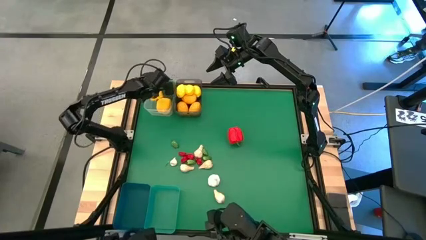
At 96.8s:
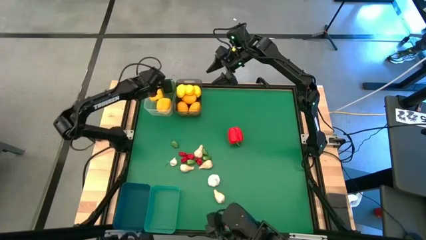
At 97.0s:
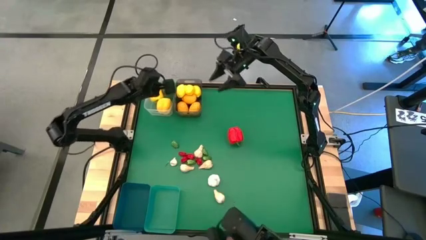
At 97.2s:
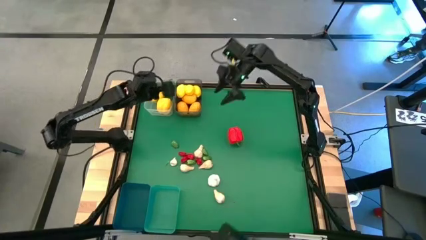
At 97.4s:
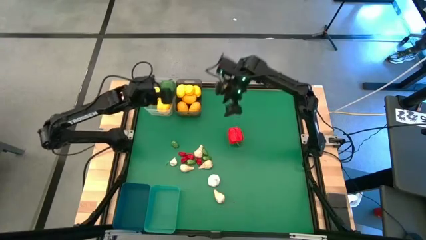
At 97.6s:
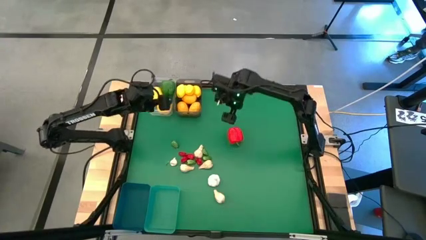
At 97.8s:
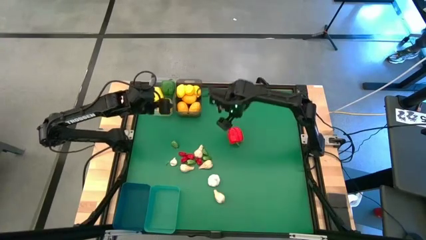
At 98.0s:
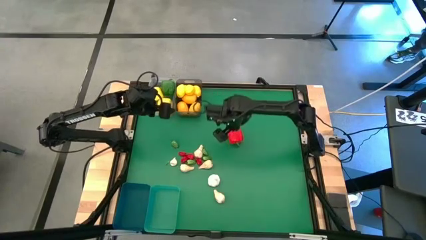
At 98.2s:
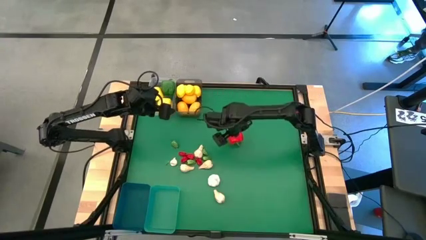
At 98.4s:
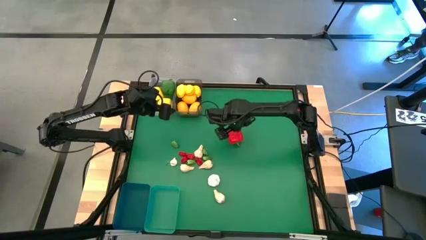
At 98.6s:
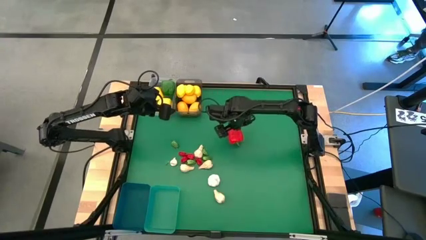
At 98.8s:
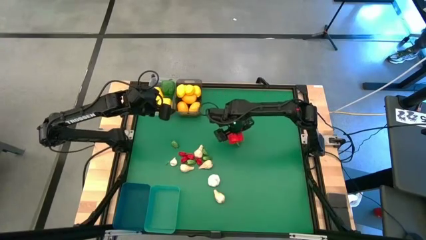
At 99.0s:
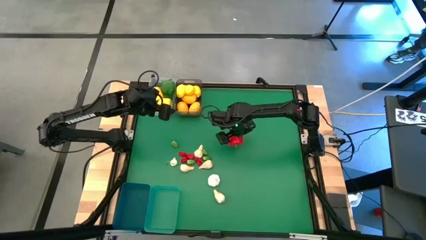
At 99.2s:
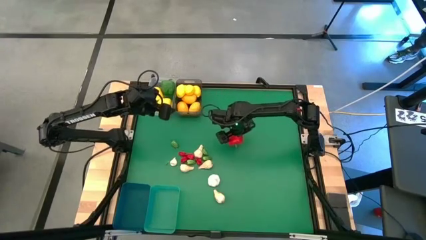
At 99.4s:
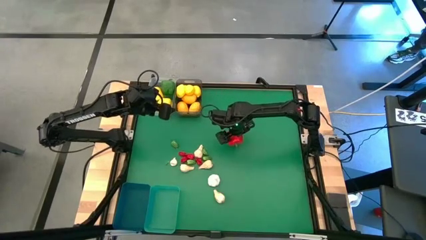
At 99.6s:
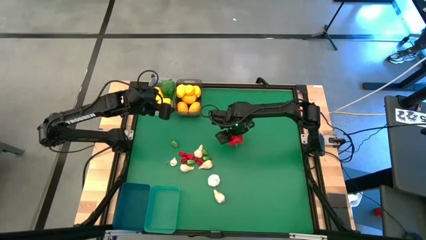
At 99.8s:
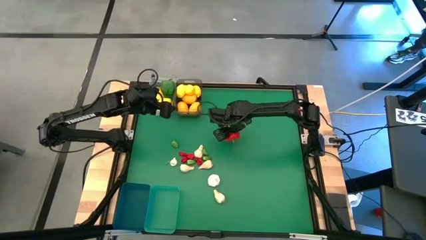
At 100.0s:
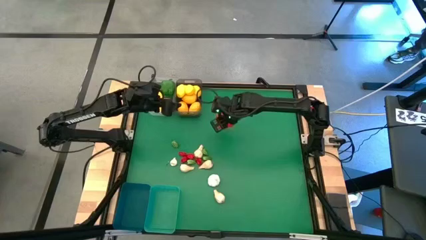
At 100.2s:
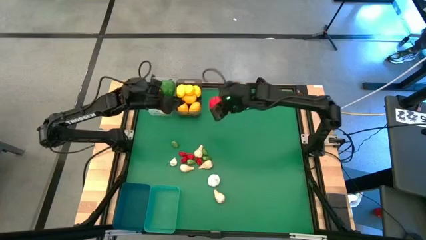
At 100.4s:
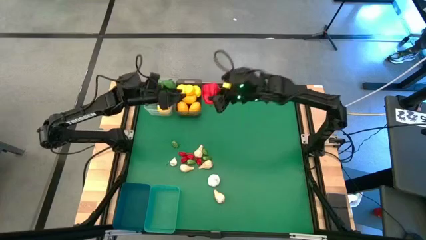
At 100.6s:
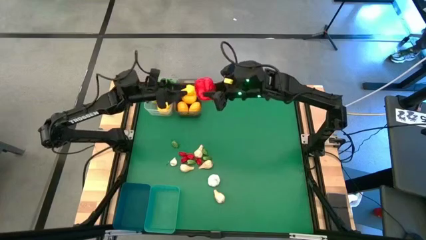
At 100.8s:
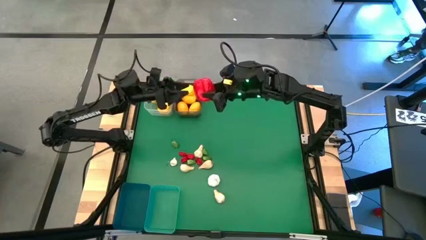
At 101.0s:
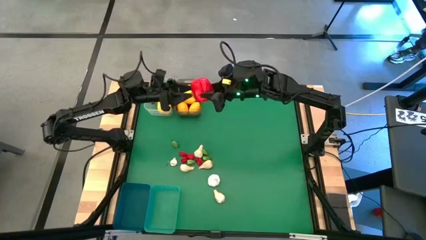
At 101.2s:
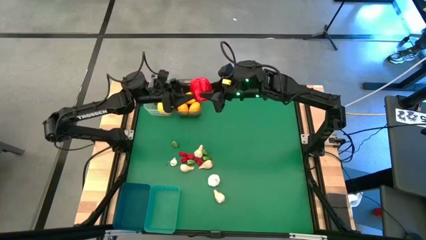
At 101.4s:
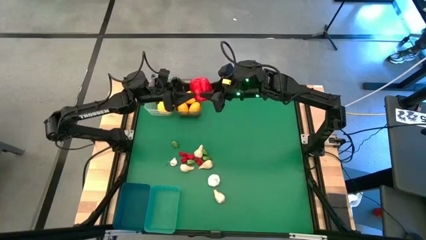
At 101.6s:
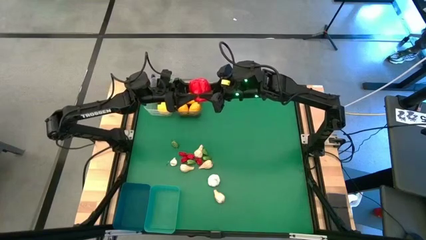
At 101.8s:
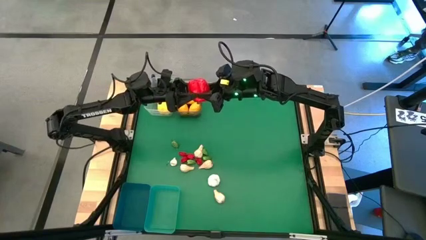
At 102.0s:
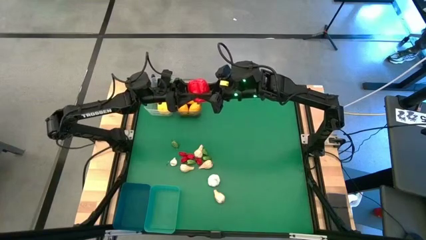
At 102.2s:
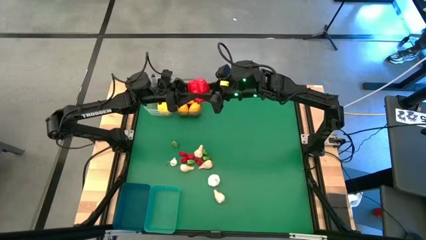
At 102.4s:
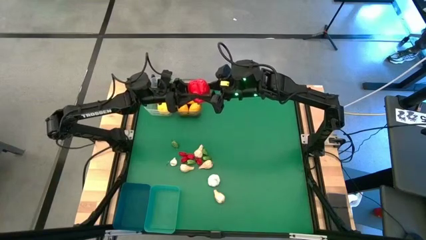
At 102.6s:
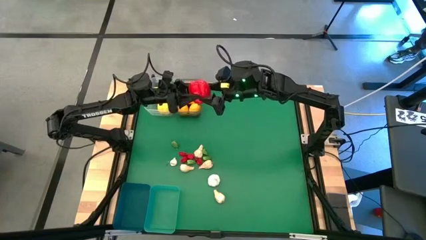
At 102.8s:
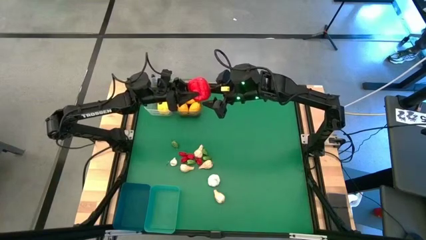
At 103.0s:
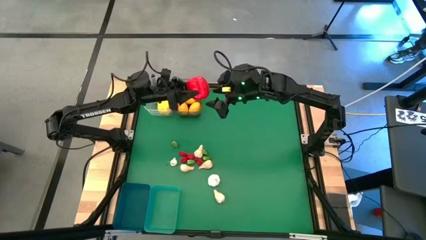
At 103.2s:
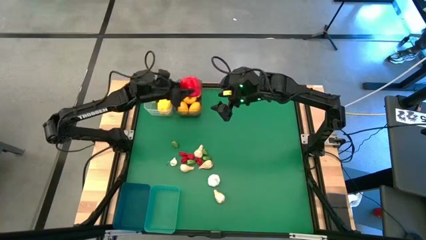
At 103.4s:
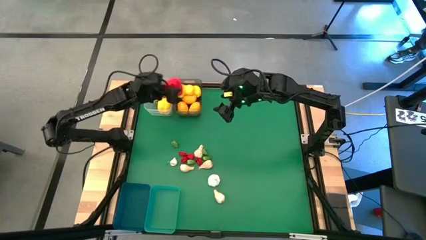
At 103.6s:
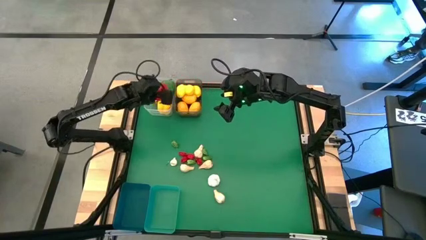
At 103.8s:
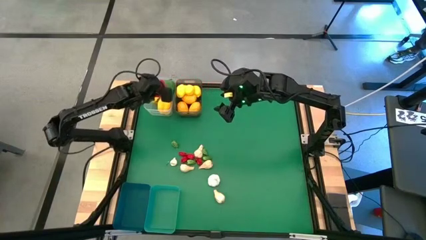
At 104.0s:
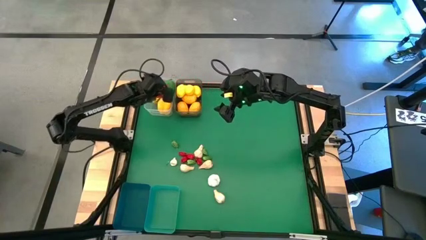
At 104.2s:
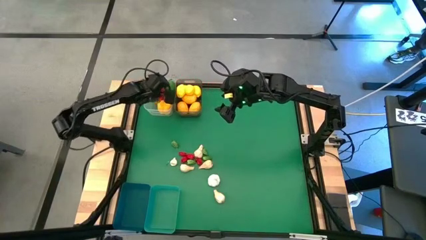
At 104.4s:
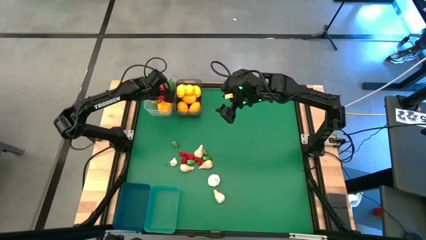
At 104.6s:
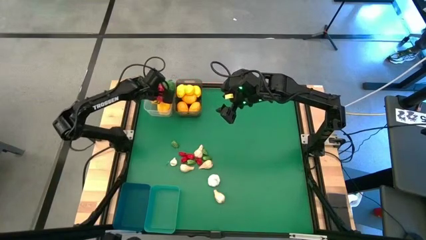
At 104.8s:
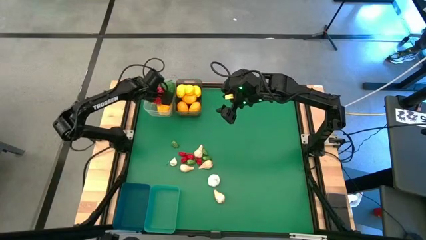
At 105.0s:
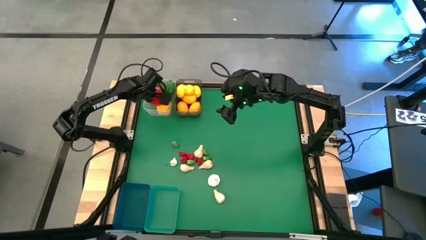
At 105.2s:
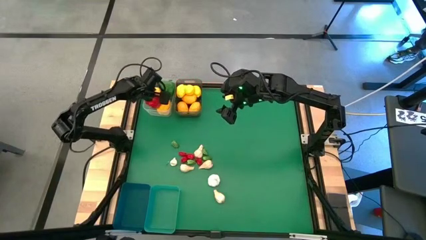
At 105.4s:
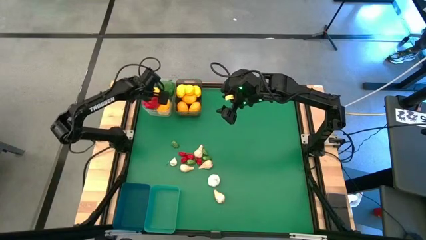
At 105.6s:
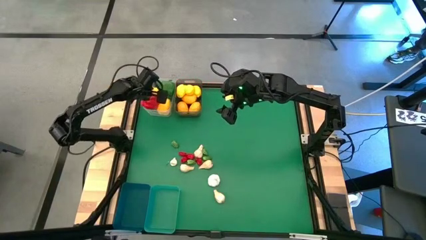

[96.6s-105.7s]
Task: Sort produce into baskets
Put the red bell pepper into the transparent bin

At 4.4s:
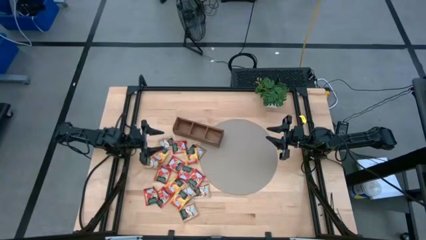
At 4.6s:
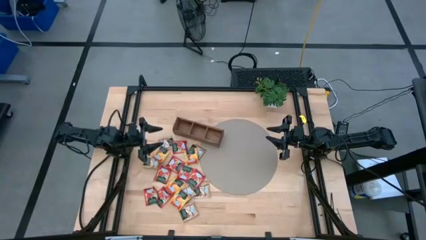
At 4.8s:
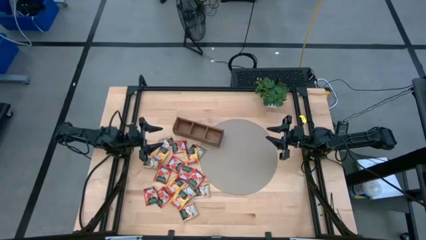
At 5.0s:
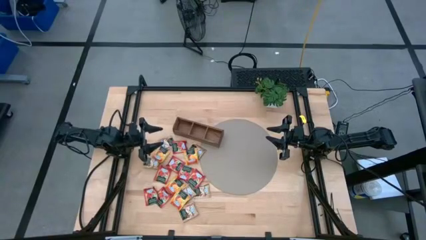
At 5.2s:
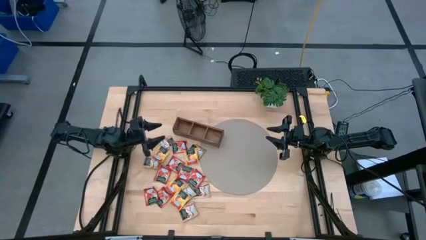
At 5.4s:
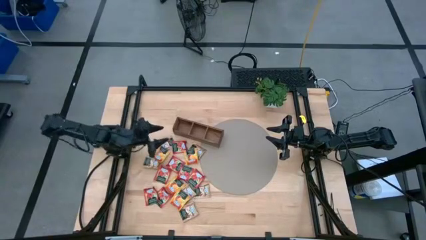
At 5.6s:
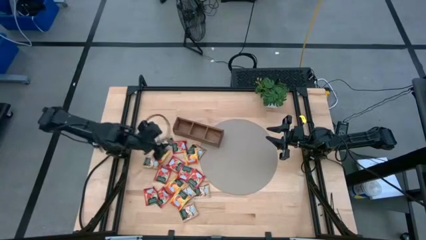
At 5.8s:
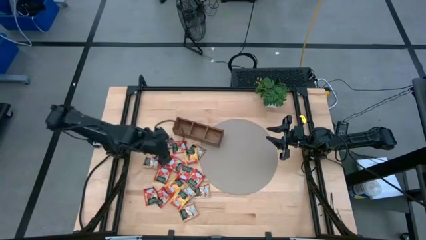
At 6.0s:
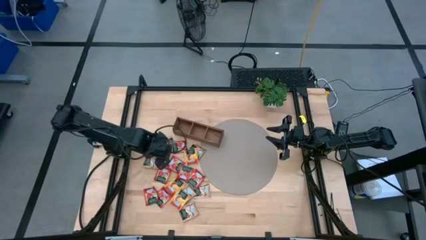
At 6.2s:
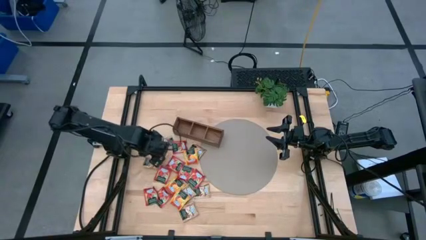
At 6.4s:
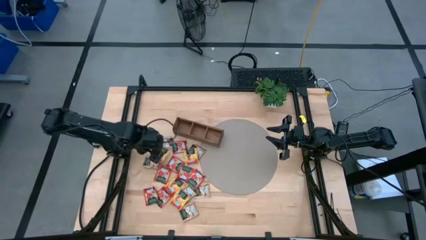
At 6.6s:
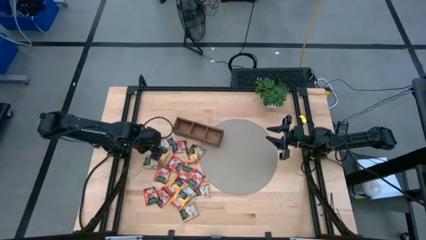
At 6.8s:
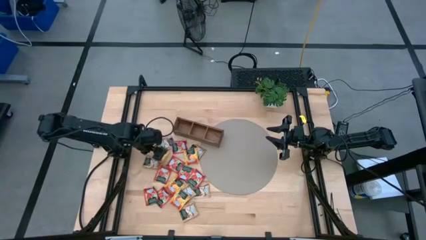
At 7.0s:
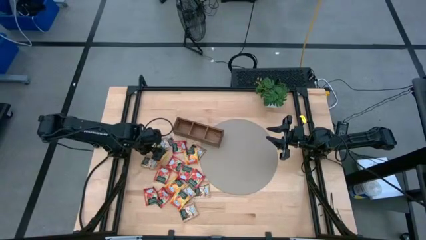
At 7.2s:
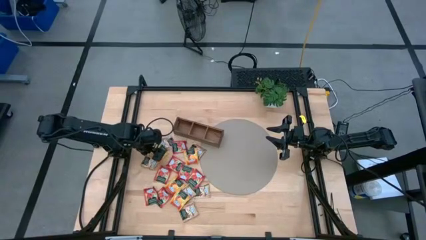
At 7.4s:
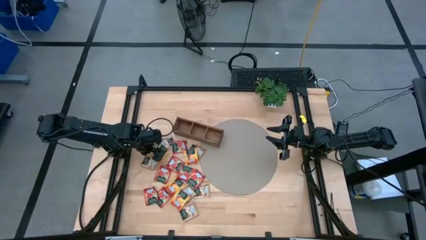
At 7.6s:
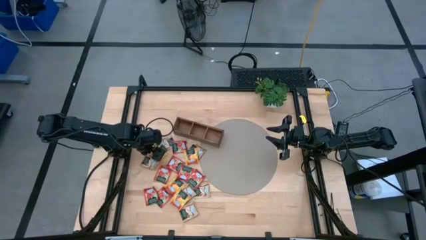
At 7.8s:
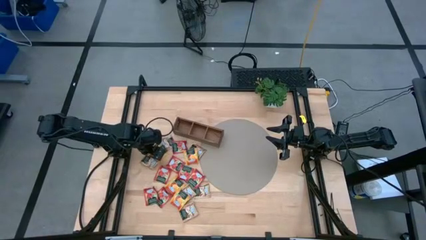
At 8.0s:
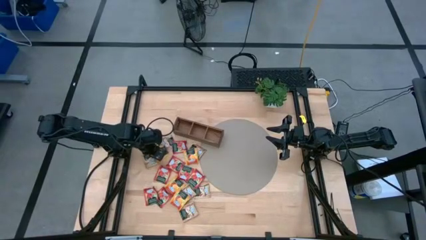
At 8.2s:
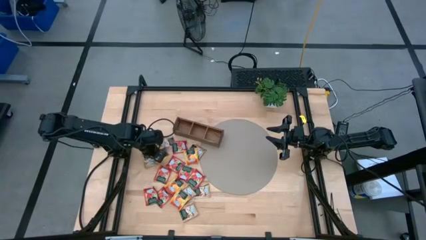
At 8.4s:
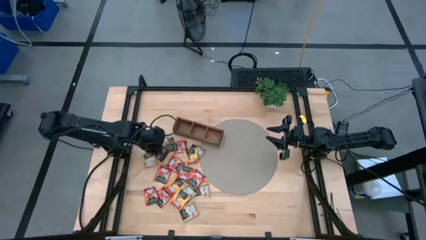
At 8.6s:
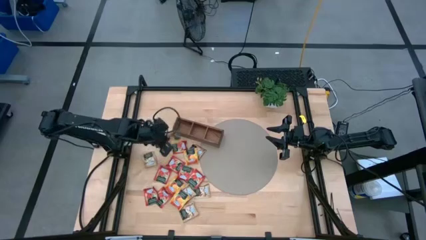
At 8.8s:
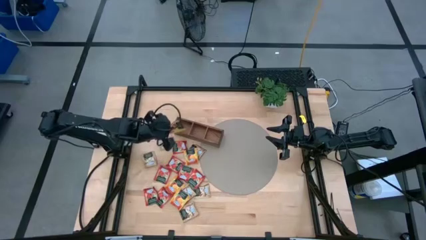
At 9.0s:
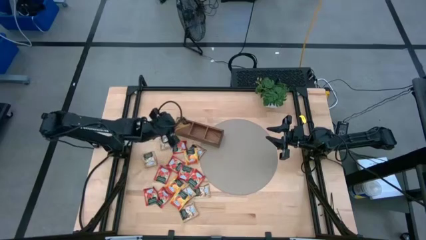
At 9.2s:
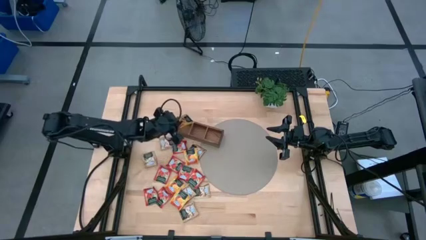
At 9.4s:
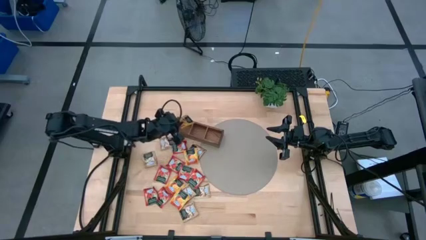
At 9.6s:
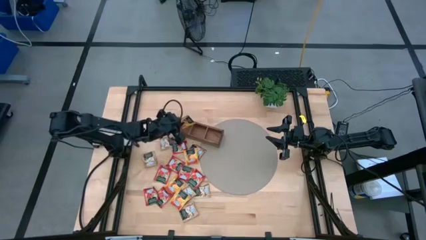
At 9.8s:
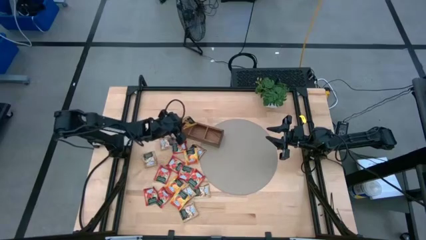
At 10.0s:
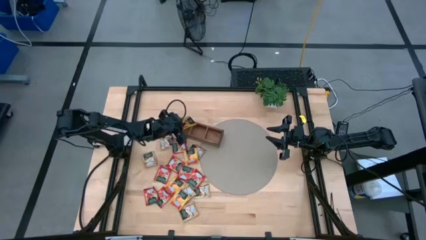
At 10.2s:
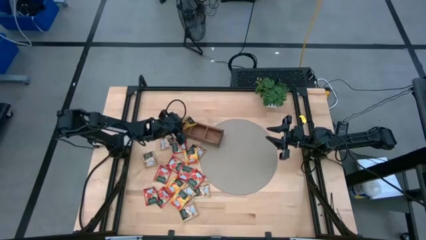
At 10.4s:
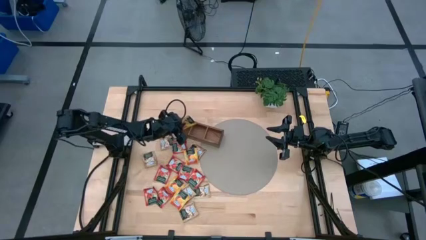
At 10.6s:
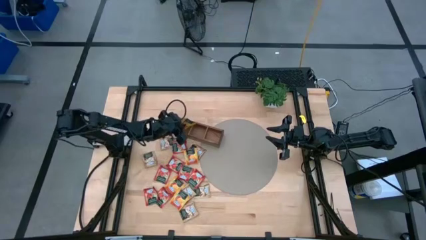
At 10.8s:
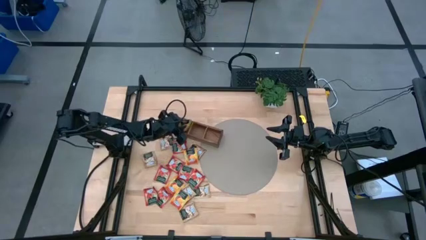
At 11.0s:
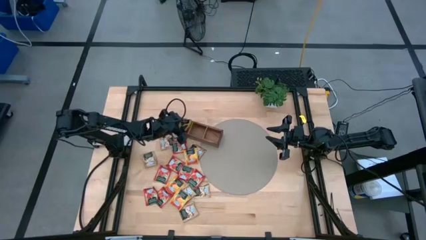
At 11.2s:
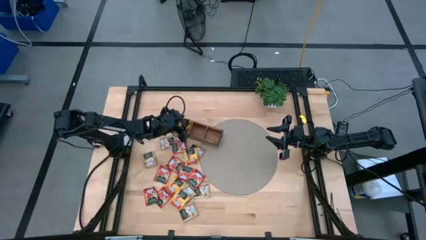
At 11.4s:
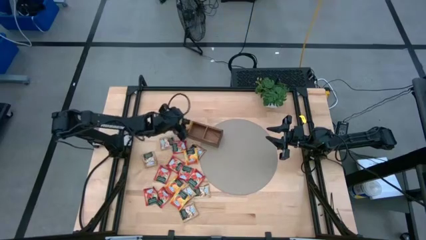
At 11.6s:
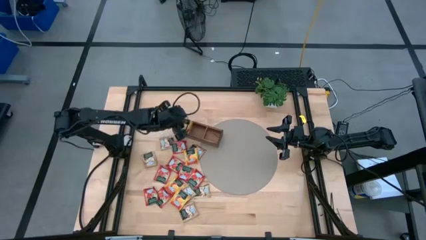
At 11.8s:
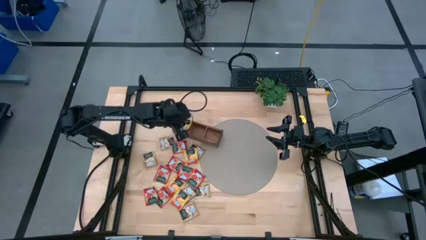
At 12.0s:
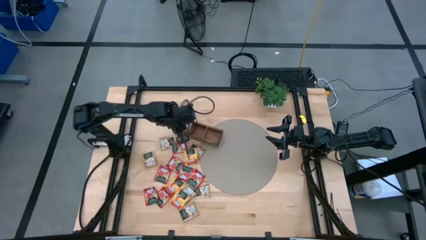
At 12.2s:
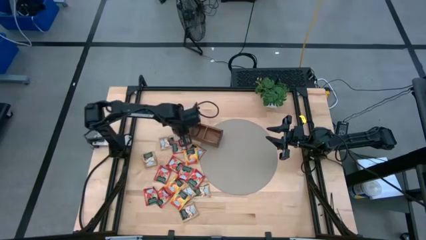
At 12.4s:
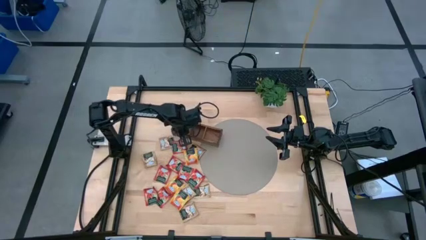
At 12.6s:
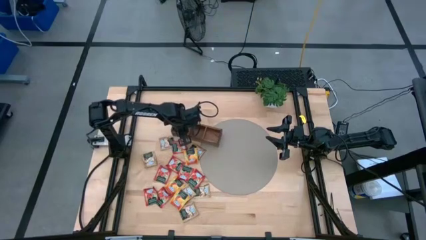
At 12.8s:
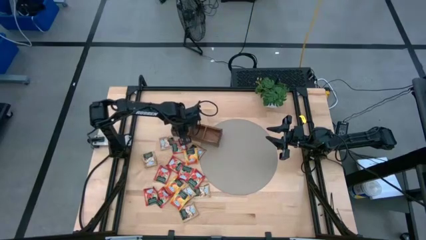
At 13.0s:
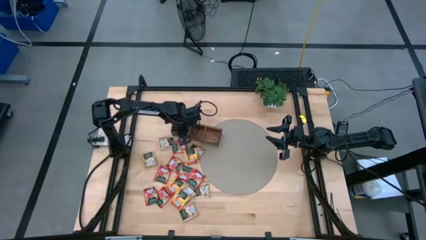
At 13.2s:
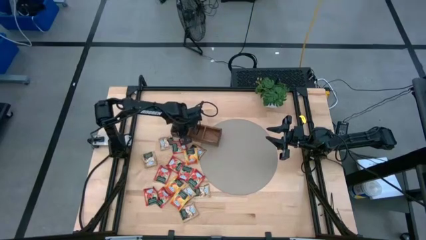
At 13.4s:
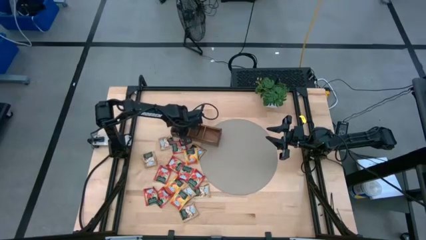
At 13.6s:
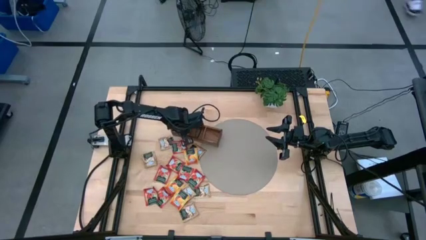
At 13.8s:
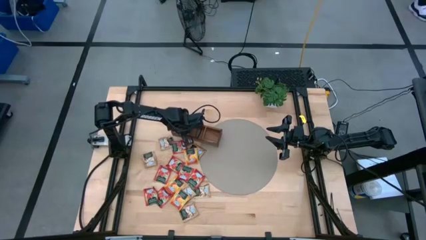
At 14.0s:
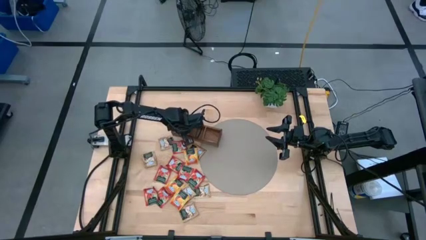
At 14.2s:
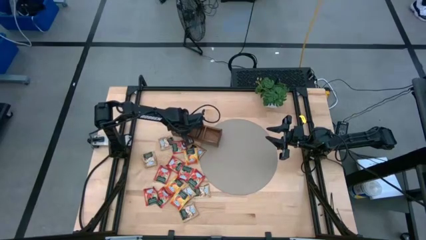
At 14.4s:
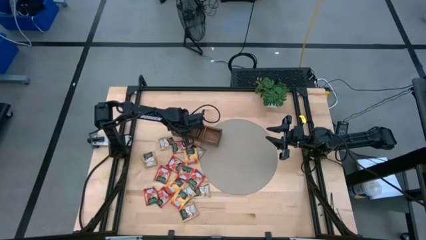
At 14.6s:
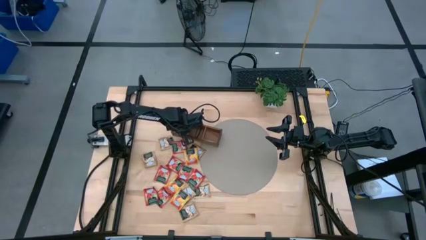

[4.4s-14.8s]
Task: Pick & Place Tea
Put the yellow tea bag into the left section of the wooden organizer
